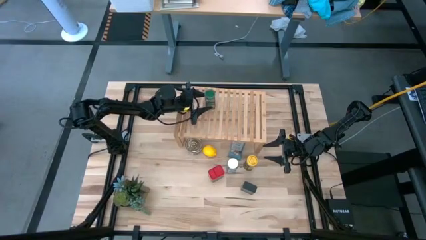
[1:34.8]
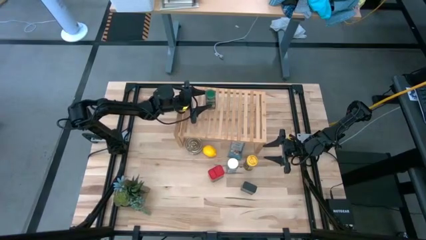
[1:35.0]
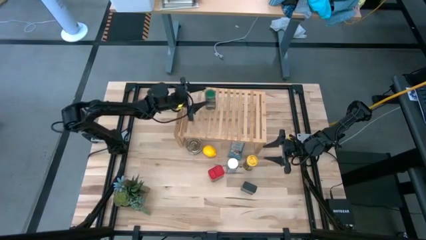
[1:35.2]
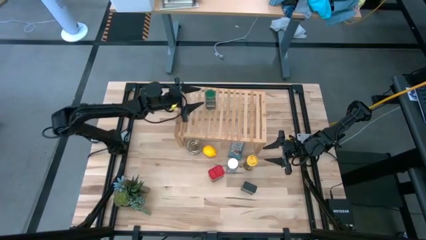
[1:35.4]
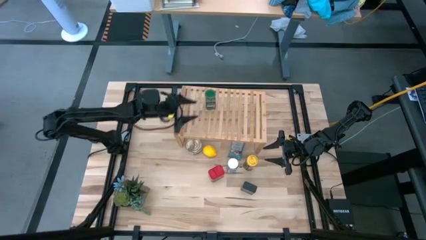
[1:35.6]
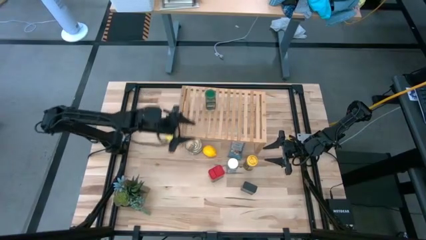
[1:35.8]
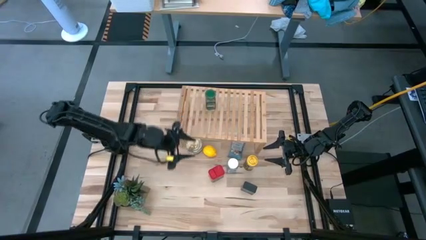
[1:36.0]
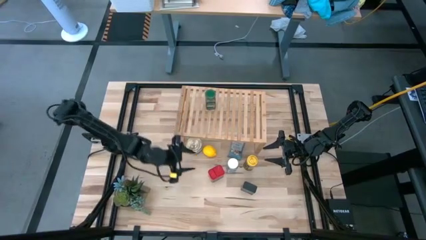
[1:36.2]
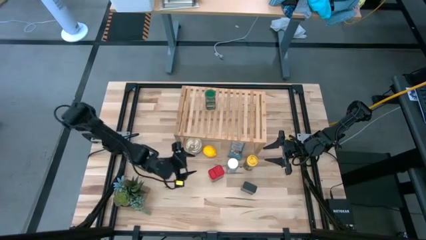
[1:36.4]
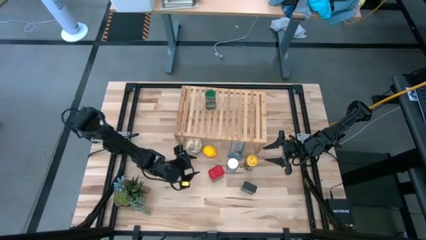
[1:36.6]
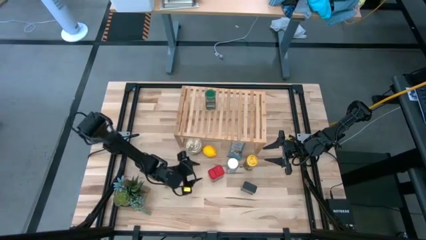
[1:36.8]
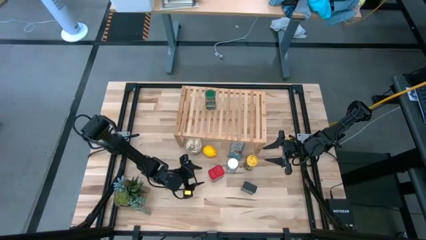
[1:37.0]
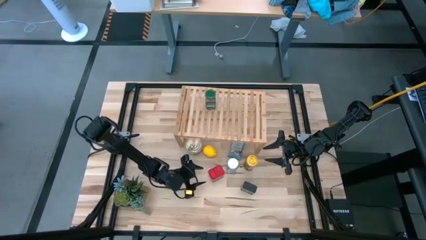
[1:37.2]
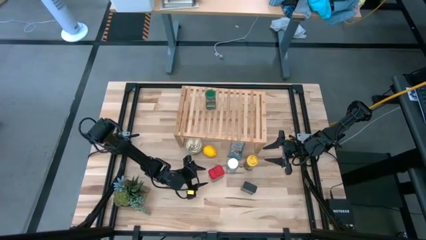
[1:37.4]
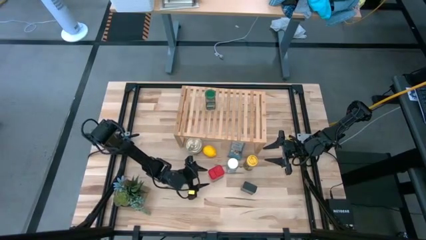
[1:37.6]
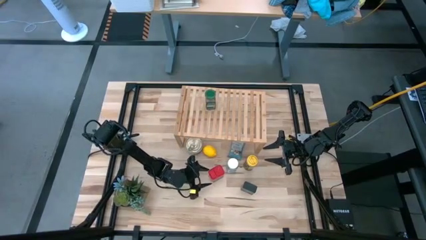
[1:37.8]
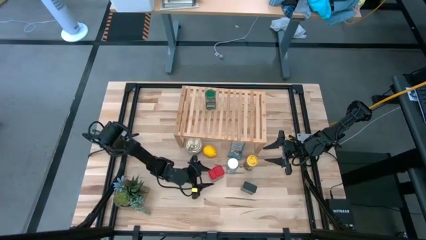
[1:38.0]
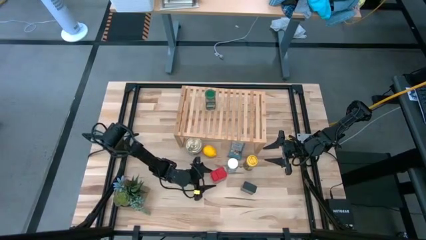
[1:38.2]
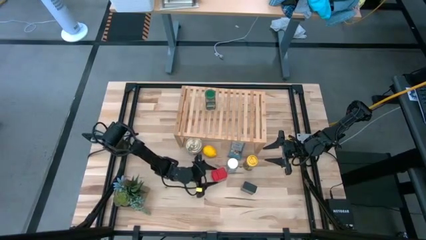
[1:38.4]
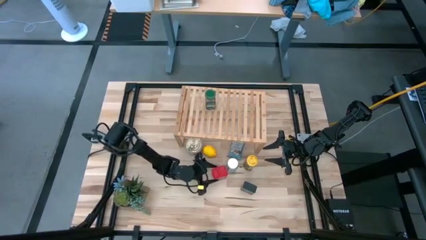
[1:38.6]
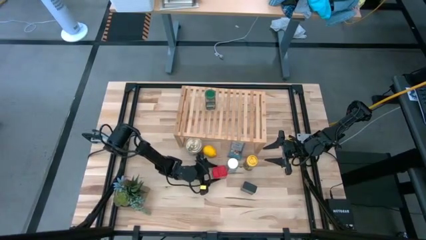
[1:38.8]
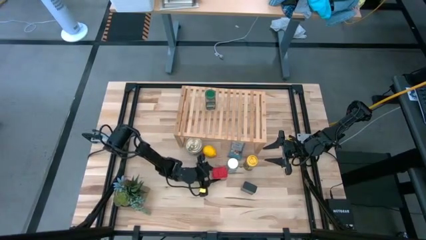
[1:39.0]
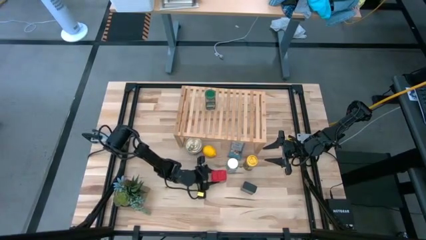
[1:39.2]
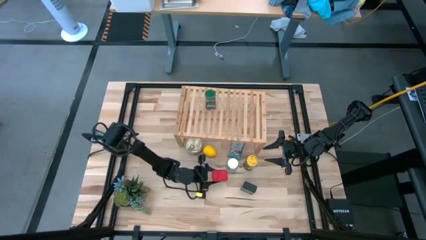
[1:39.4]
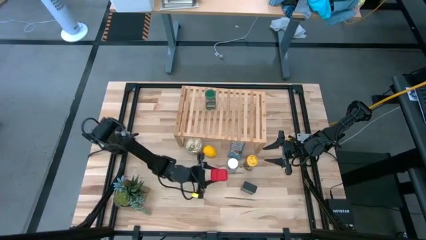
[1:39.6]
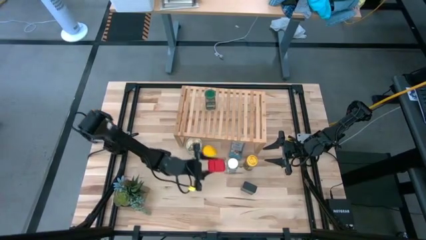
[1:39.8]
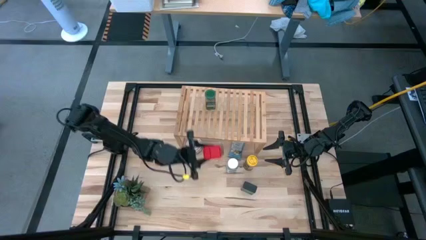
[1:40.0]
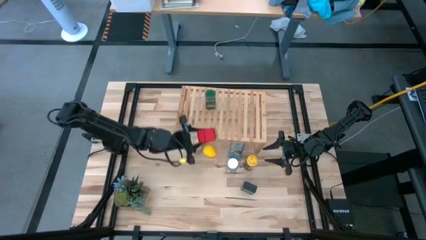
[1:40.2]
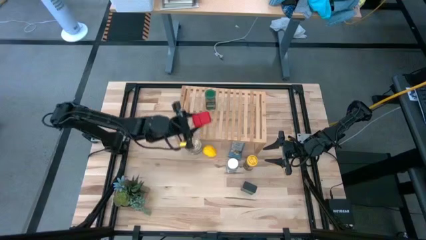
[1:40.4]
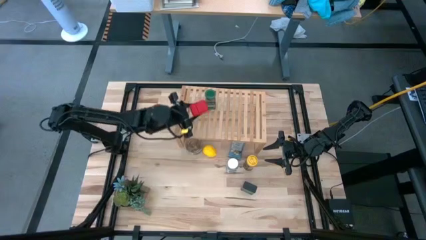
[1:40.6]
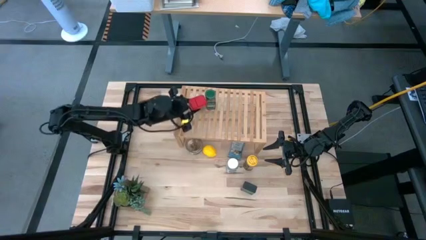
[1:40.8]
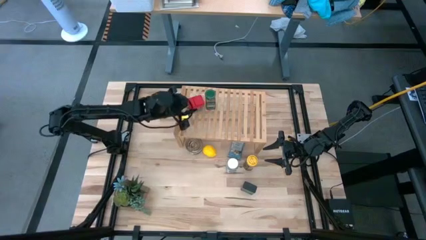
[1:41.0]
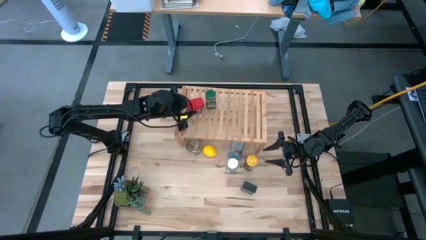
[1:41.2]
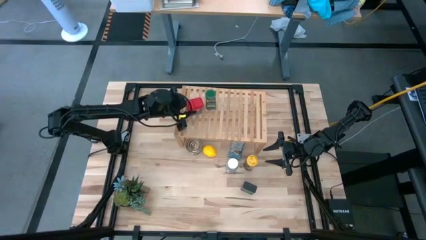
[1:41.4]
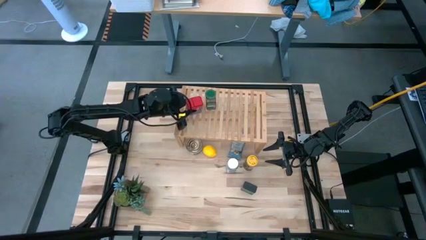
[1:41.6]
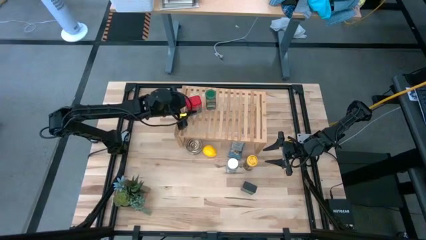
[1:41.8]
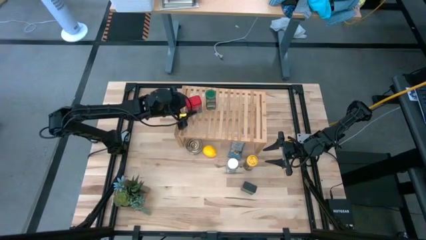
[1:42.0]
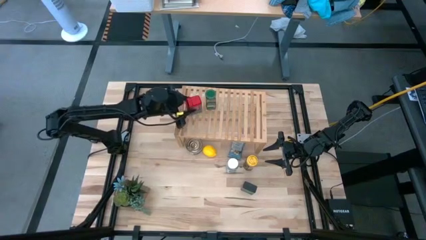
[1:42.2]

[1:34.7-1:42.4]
Task: Shelf spices
Put the red seasoning can on the shelf
